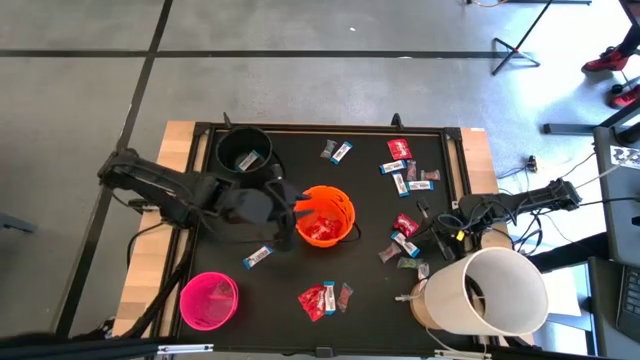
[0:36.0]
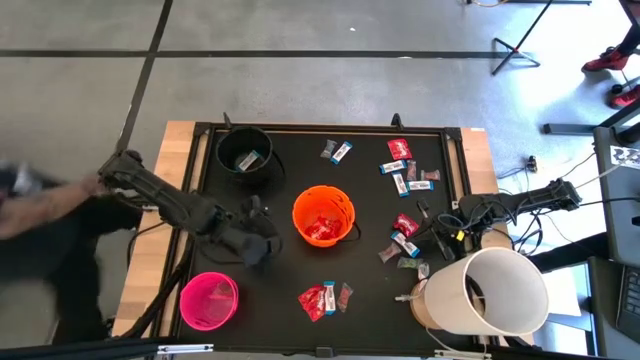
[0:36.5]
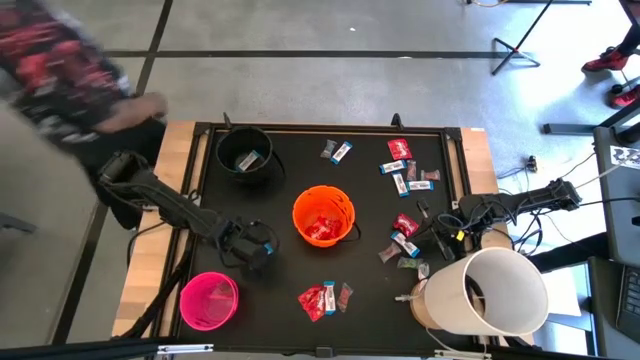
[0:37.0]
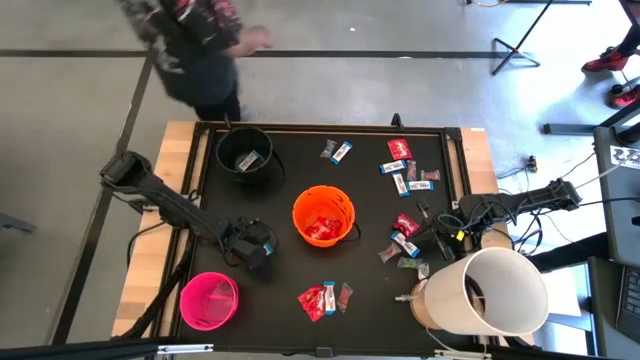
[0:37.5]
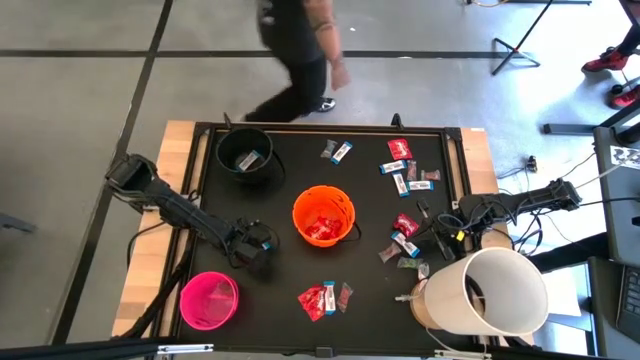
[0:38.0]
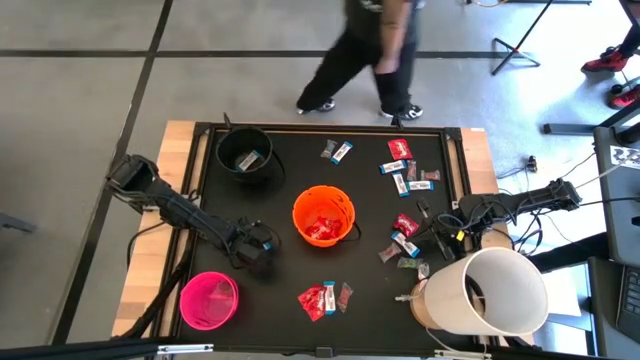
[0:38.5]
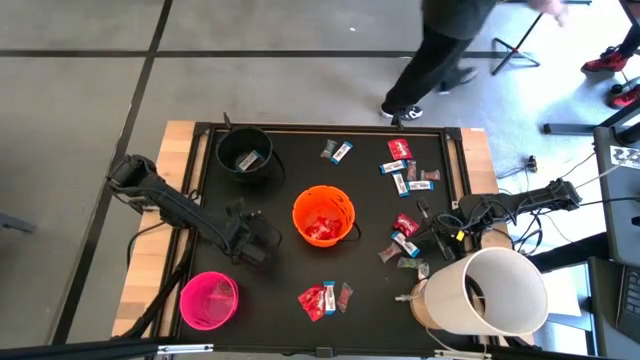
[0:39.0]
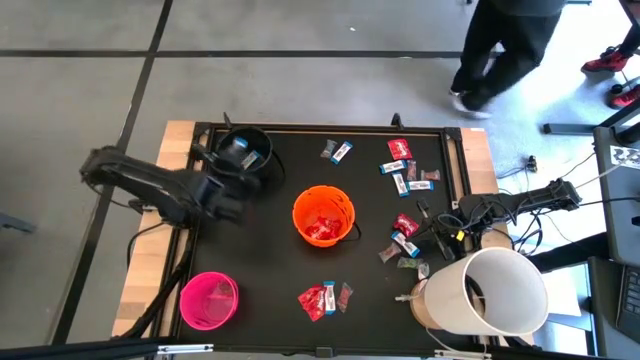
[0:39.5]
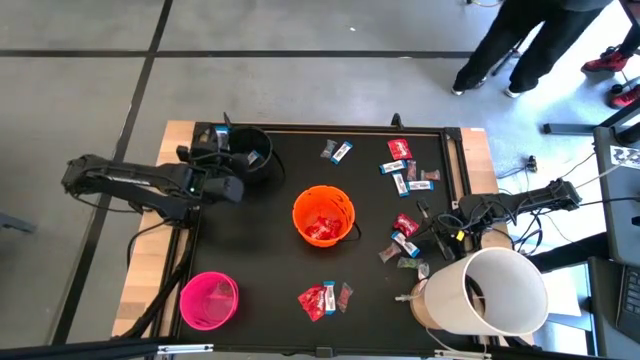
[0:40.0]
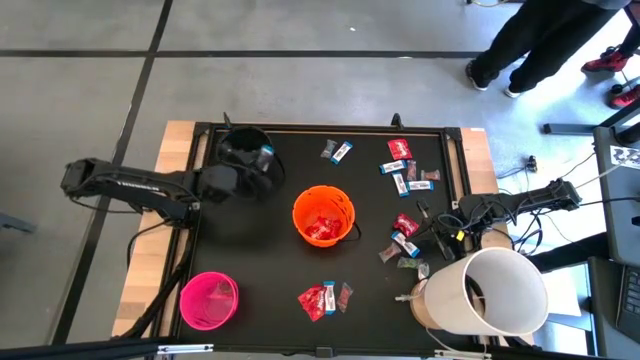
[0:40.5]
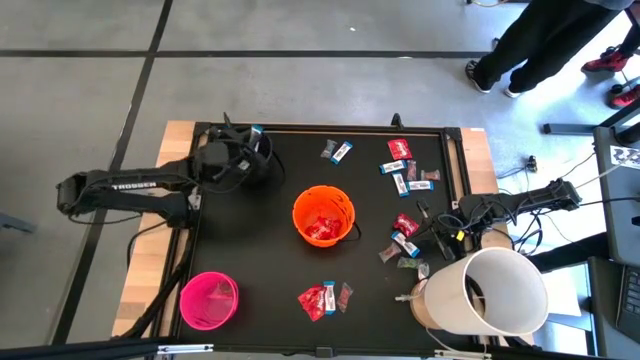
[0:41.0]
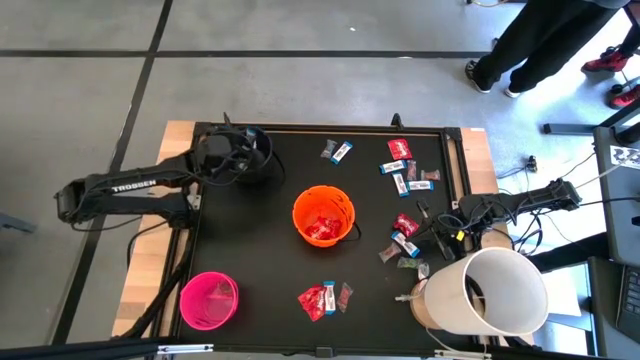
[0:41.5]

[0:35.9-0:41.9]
Task: Sort candy
Put the white chocolate into the black bucket

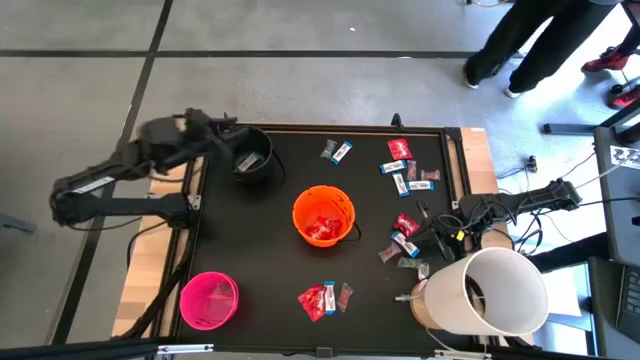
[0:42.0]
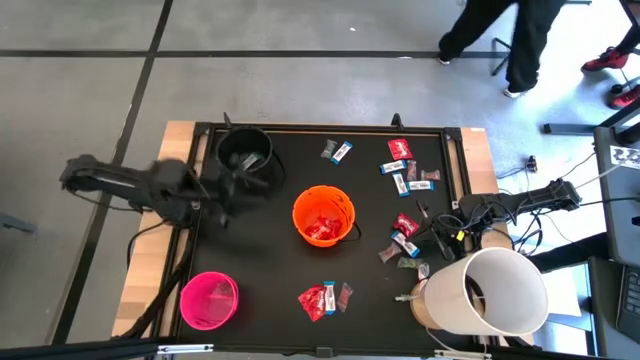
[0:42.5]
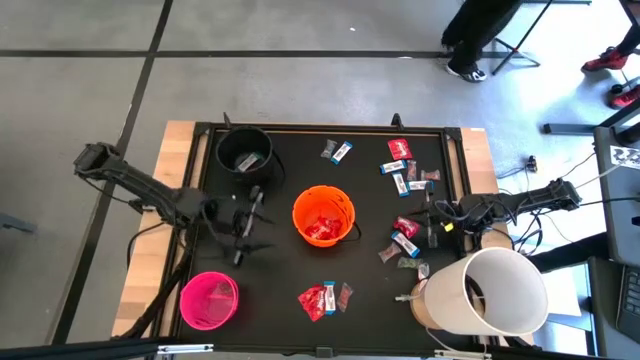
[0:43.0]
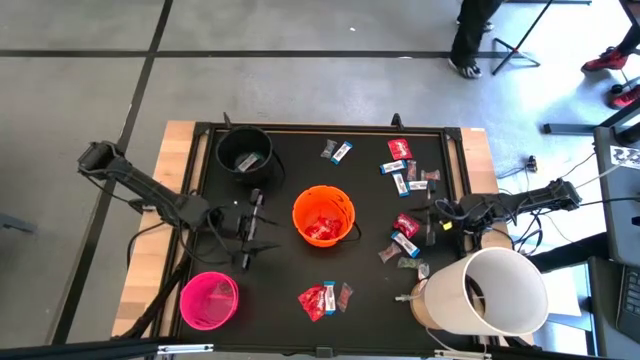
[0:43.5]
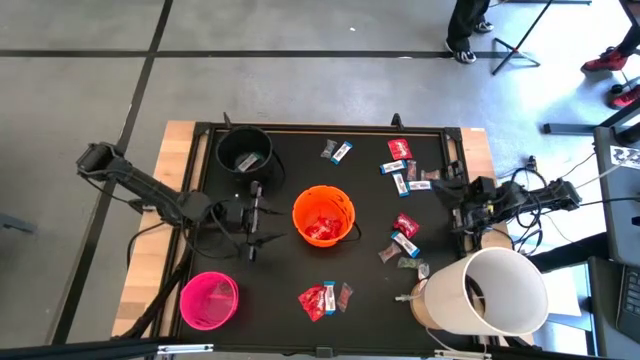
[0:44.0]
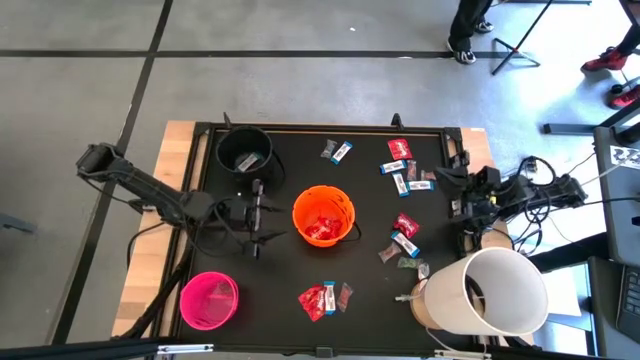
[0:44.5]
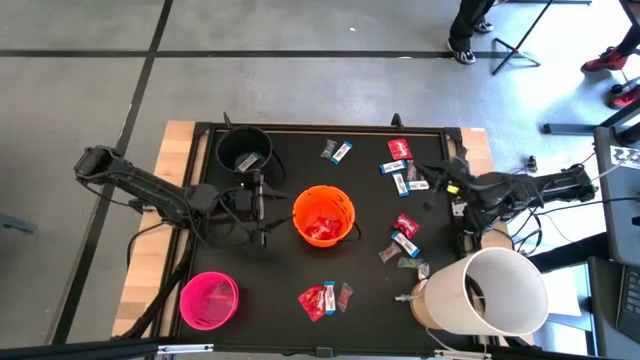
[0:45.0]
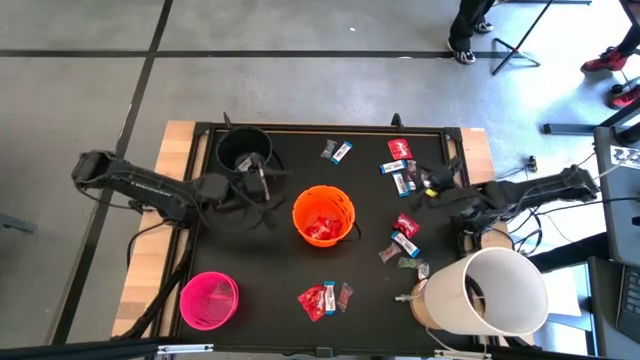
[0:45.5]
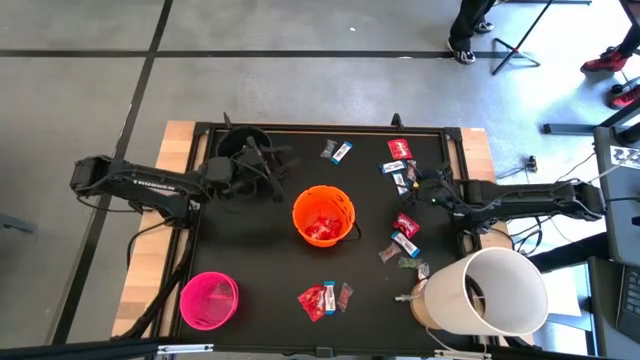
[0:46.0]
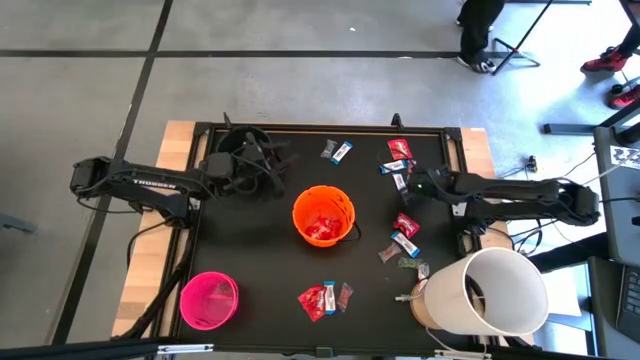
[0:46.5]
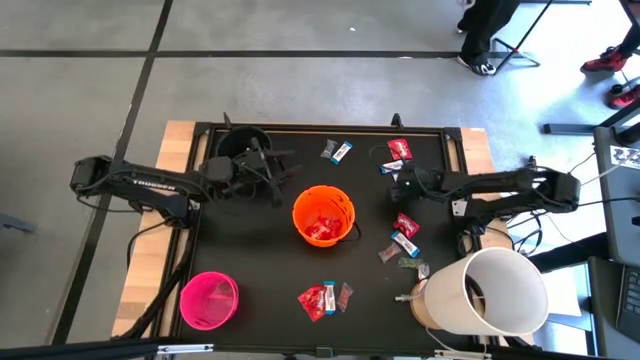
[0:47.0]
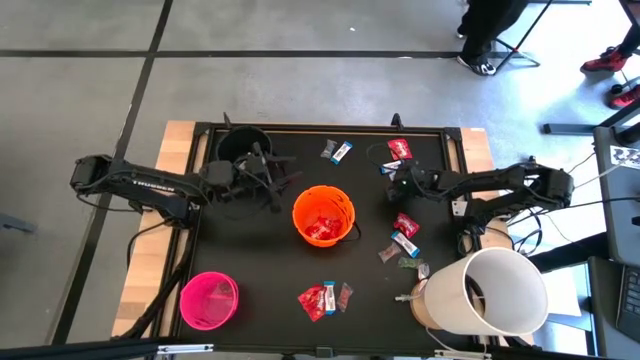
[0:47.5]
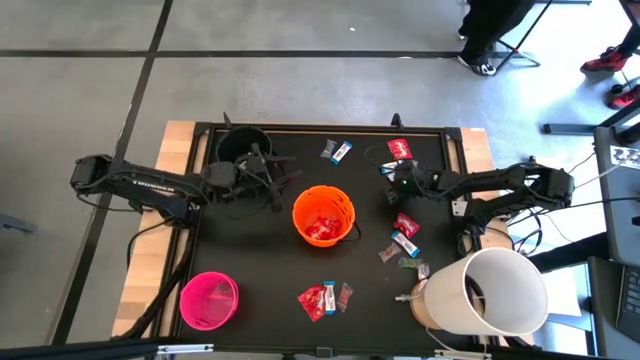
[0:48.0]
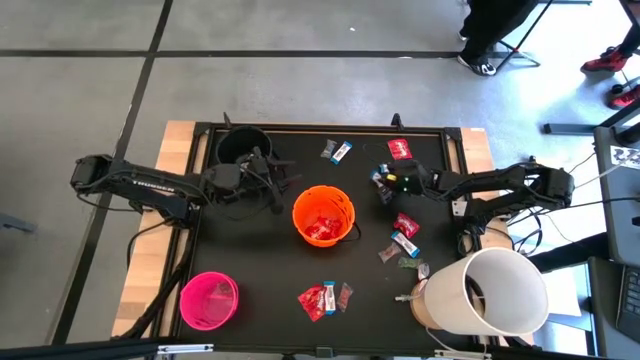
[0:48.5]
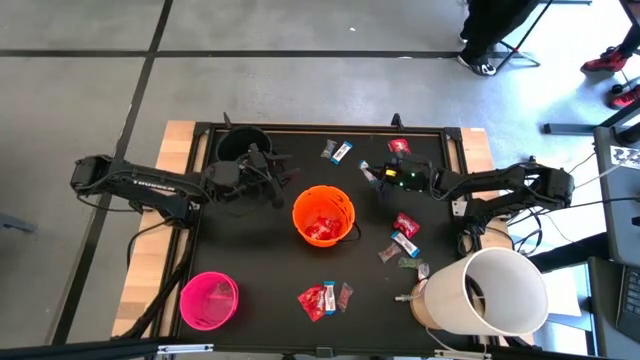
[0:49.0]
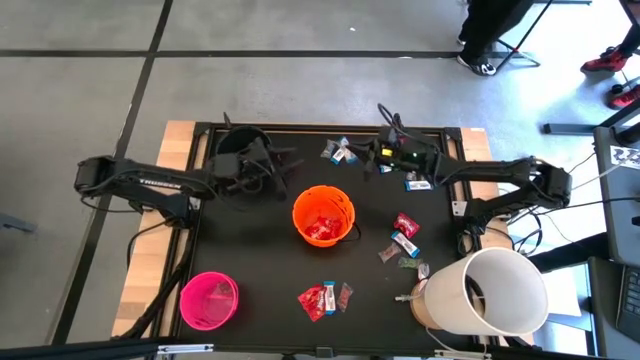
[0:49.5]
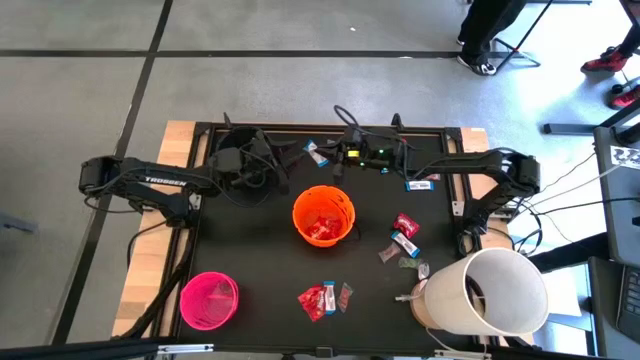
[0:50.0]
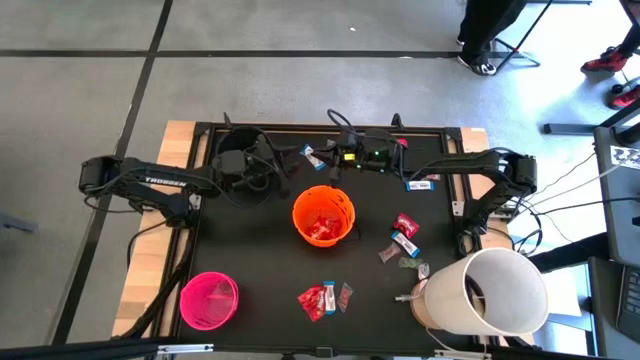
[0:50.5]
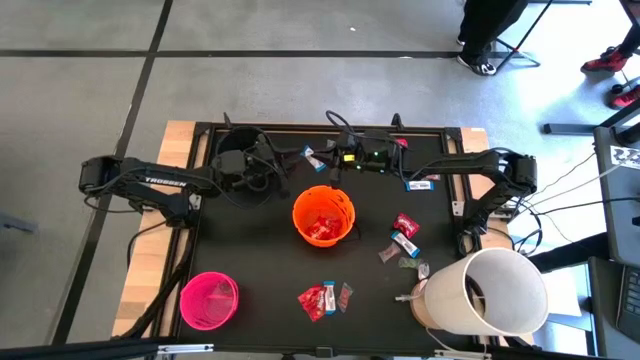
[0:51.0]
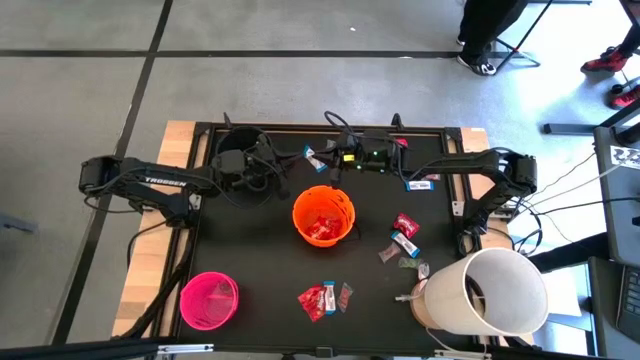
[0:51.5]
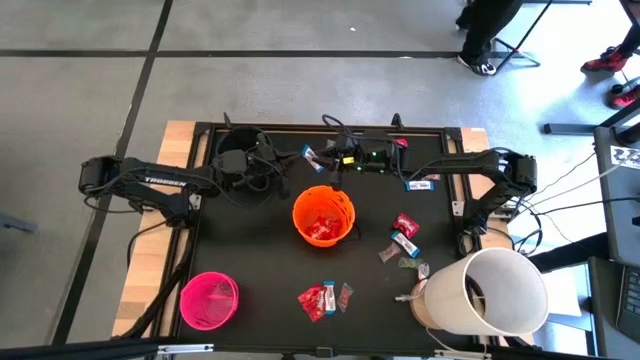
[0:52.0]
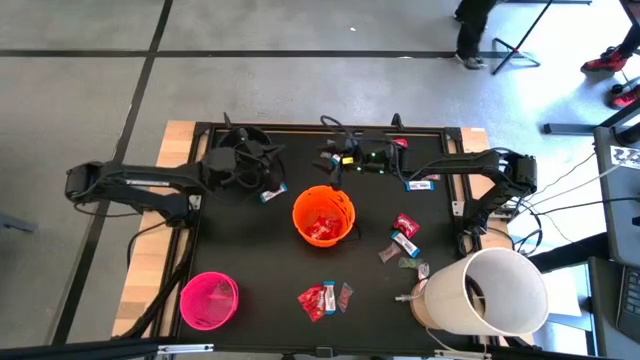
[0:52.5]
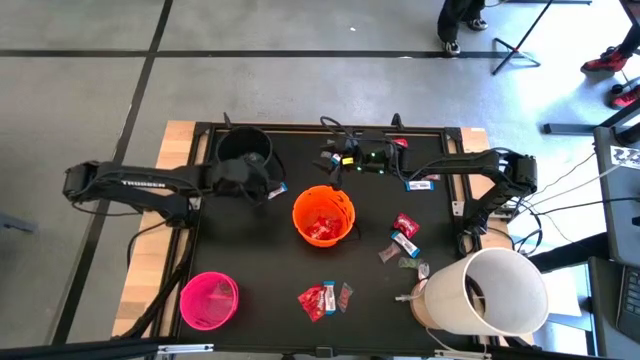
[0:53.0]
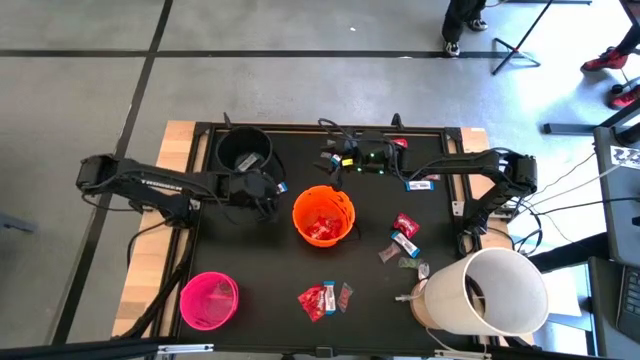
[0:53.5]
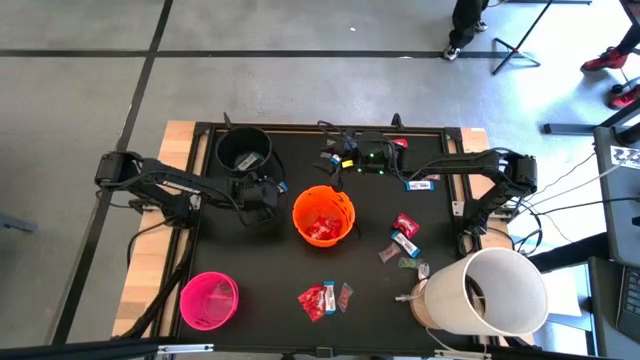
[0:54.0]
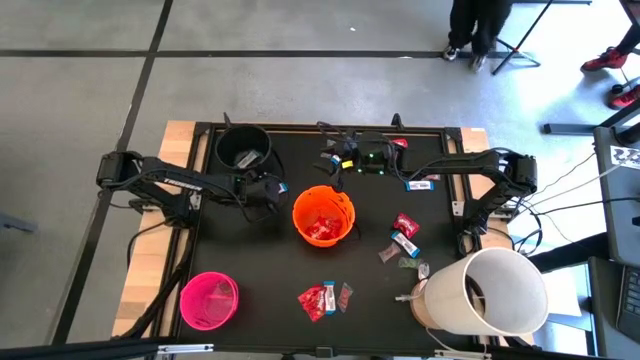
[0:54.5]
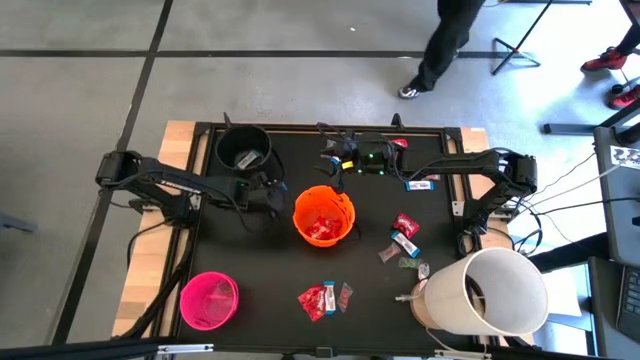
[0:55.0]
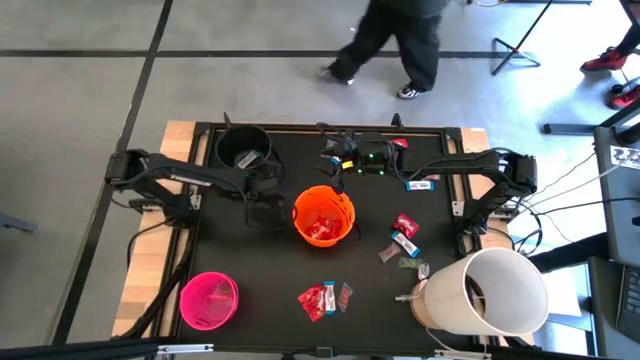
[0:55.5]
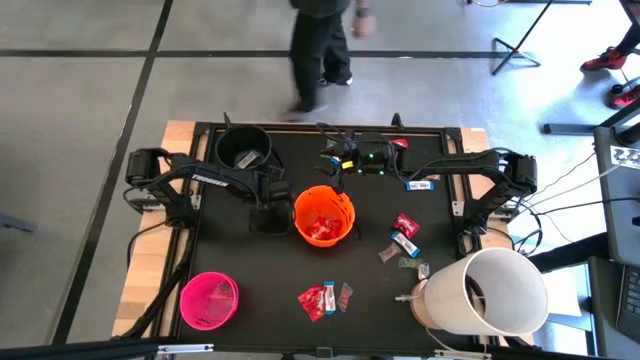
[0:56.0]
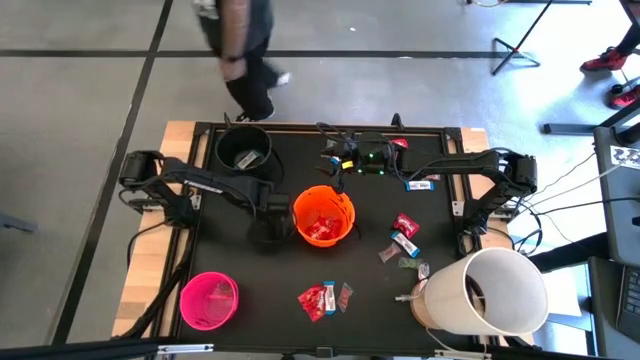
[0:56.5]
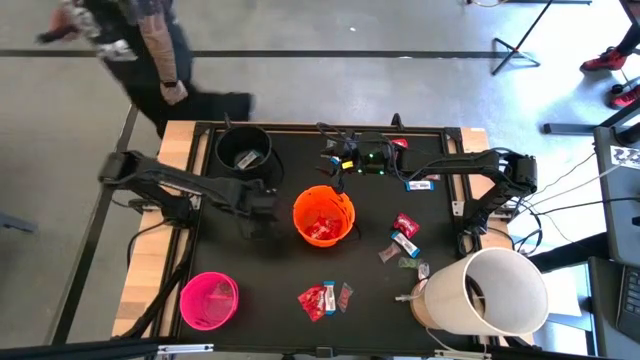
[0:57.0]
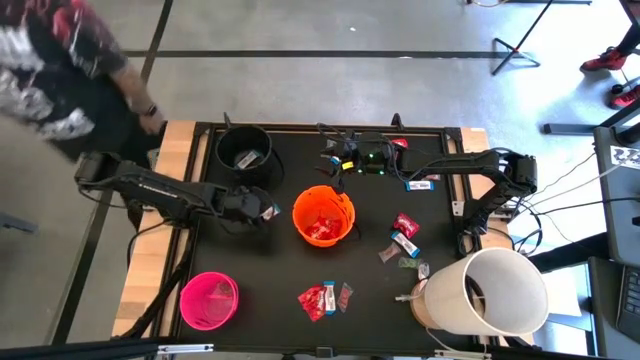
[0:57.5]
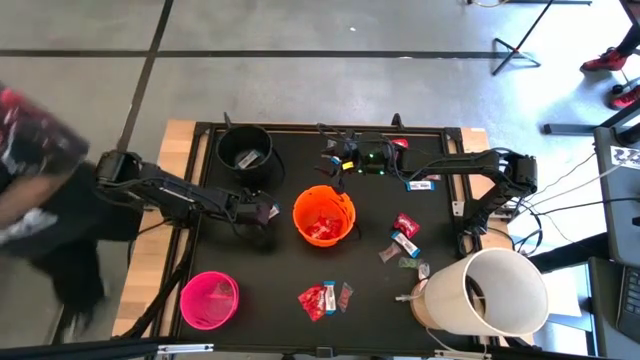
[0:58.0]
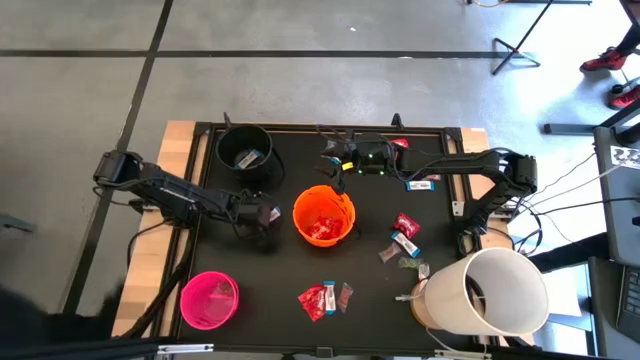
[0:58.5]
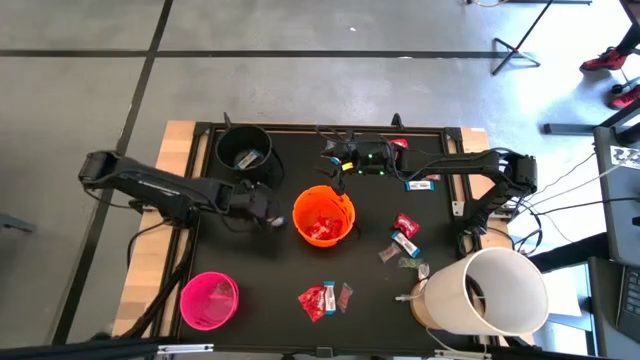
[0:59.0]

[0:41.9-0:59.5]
Put the white chocolate into the black bucket
